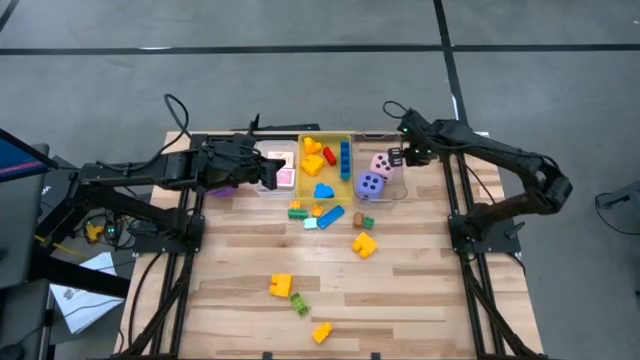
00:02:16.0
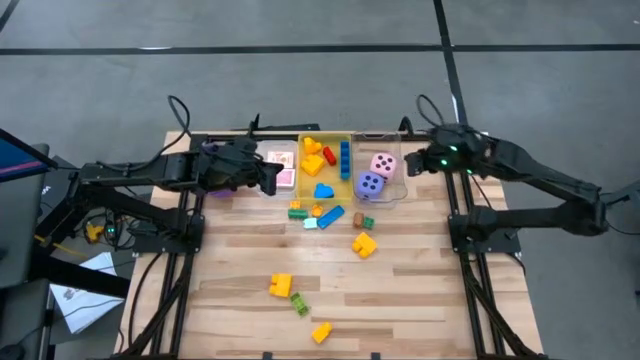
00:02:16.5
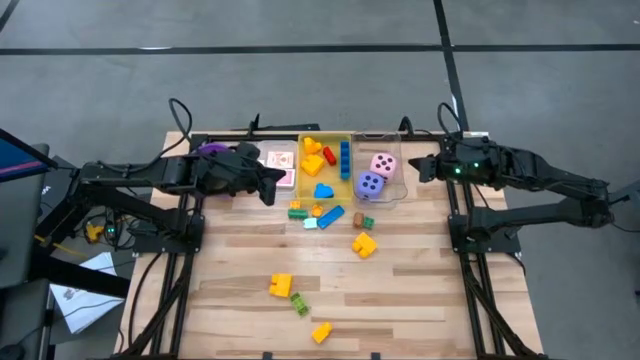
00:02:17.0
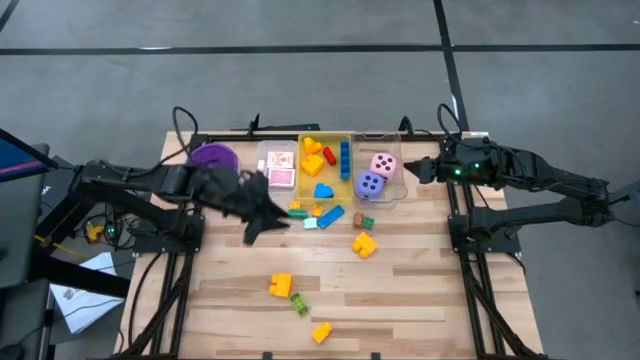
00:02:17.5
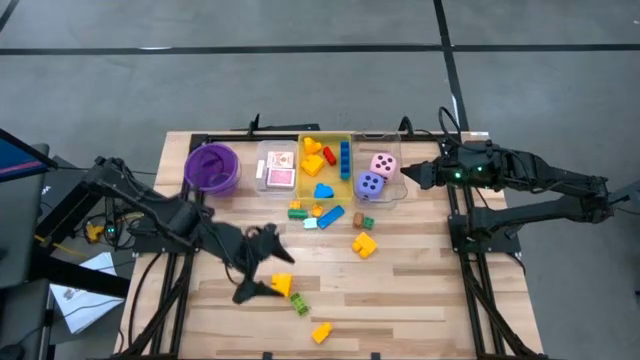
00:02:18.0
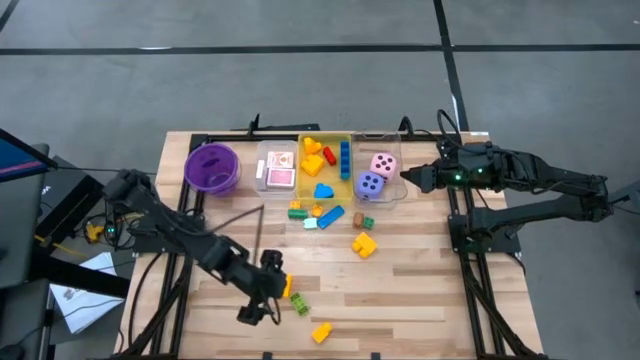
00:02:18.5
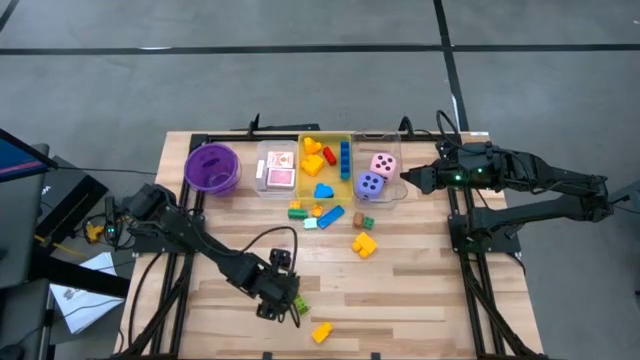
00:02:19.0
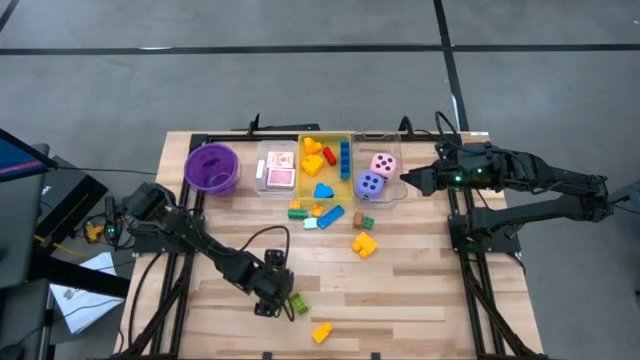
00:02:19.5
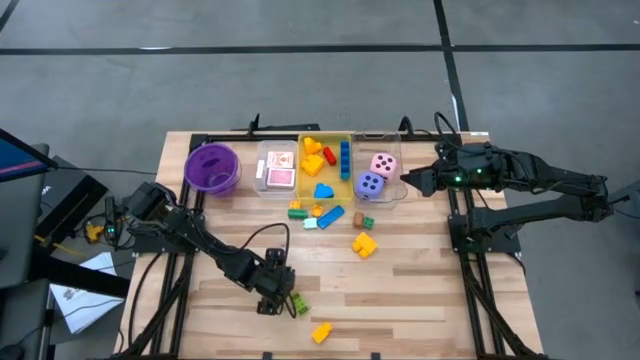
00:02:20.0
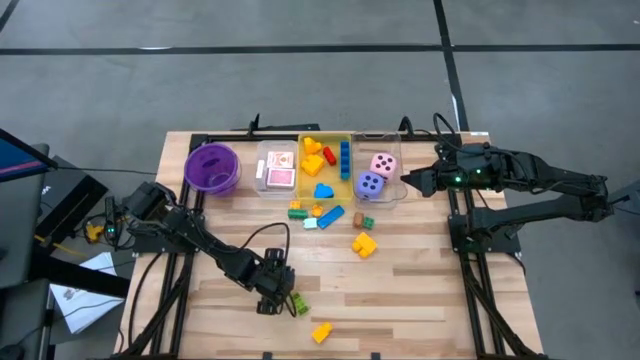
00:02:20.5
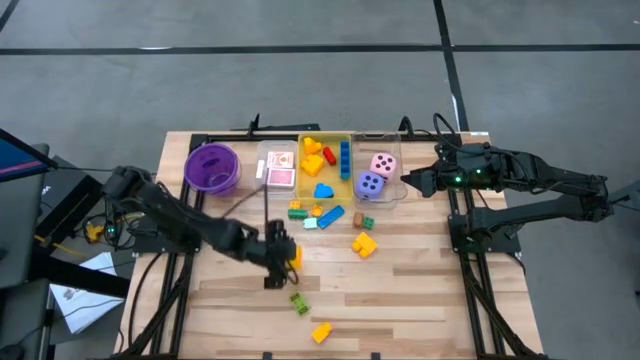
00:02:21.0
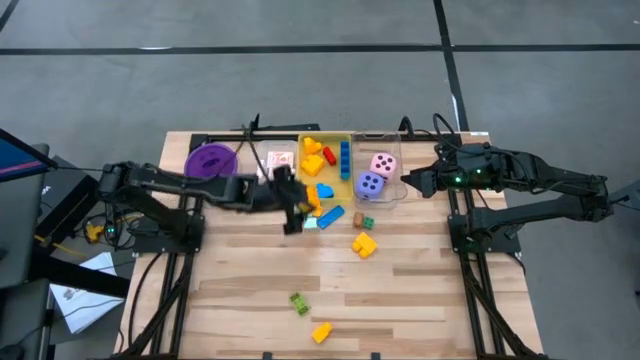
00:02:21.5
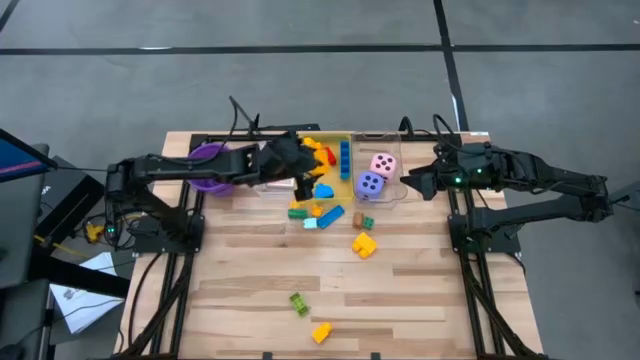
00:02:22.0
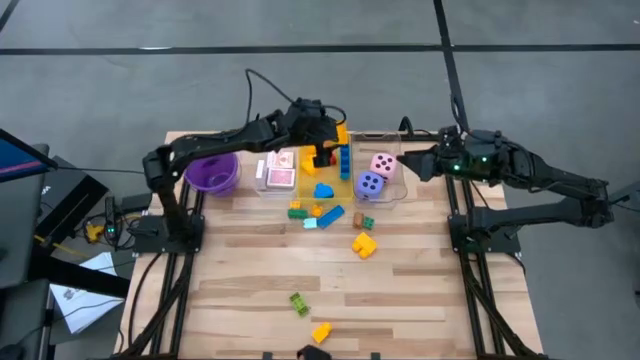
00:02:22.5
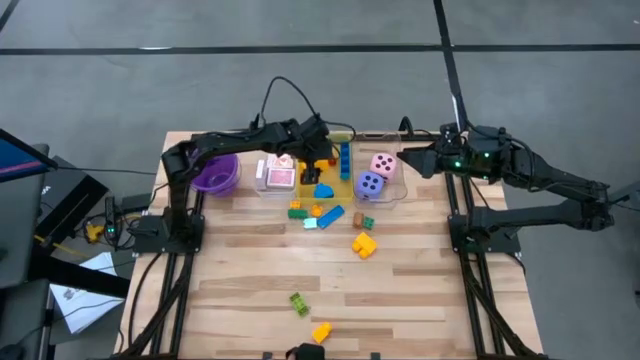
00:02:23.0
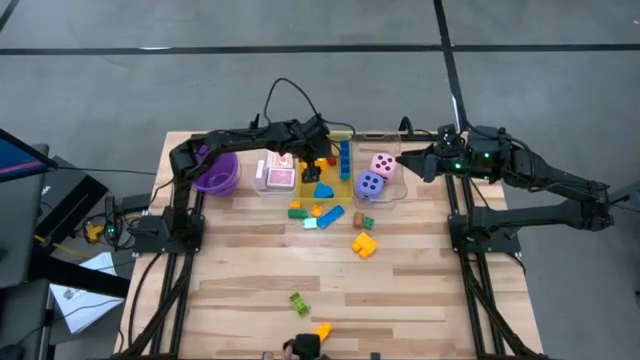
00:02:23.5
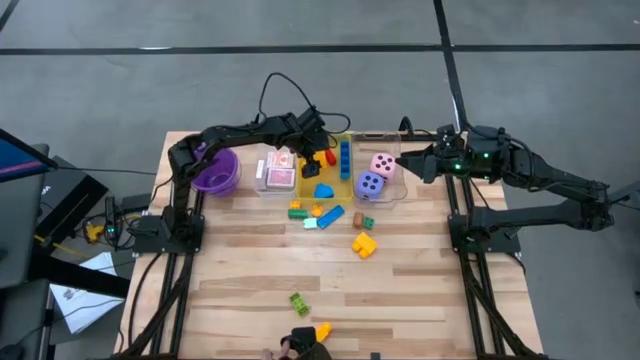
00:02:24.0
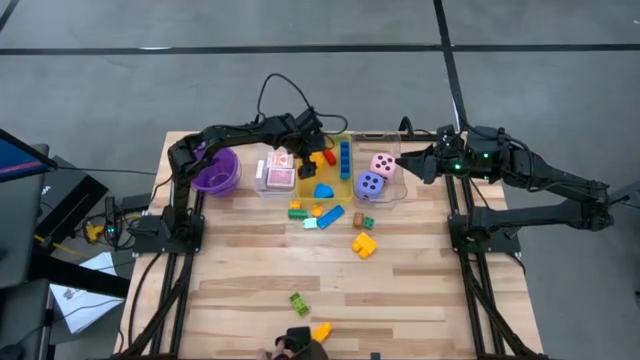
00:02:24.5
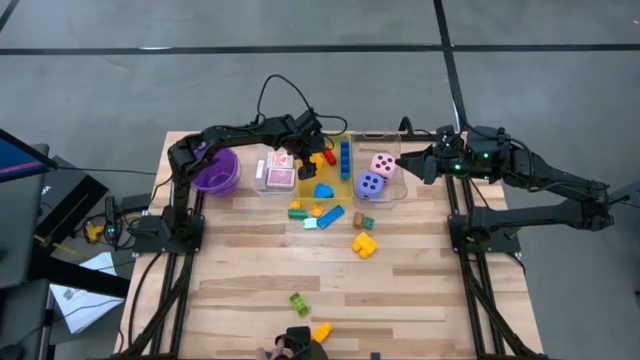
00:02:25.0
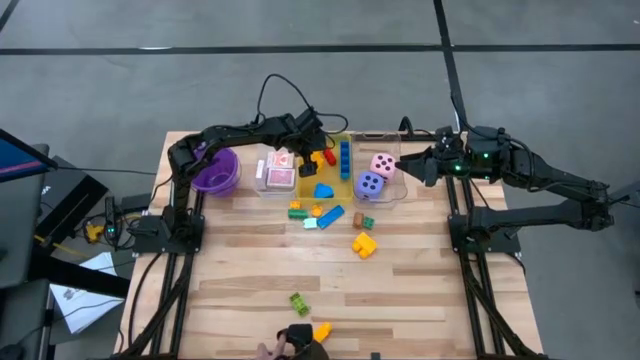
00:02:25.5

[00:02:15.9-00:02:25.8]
Task: Pick & Place Toys
Put the yellow gamepiece into the yellow bin

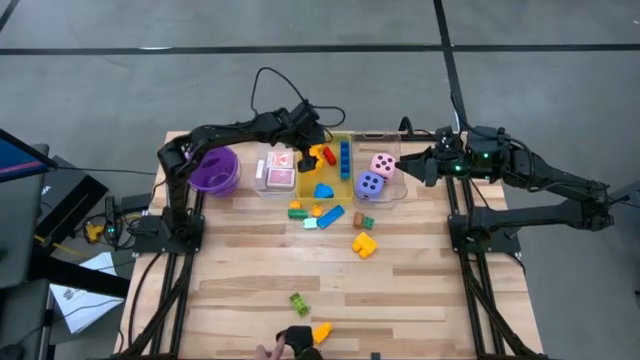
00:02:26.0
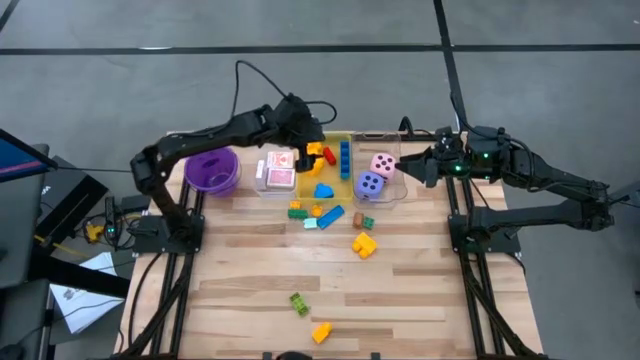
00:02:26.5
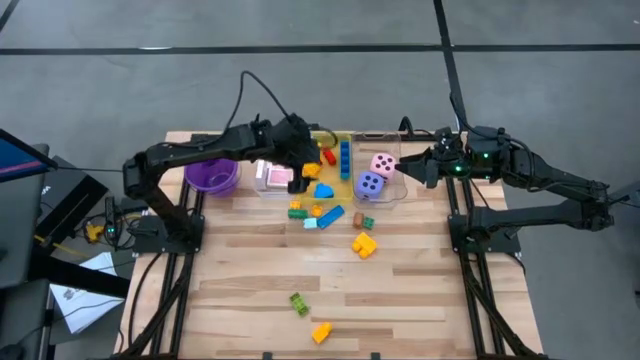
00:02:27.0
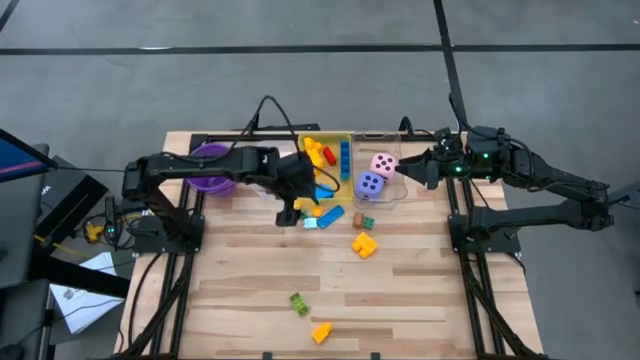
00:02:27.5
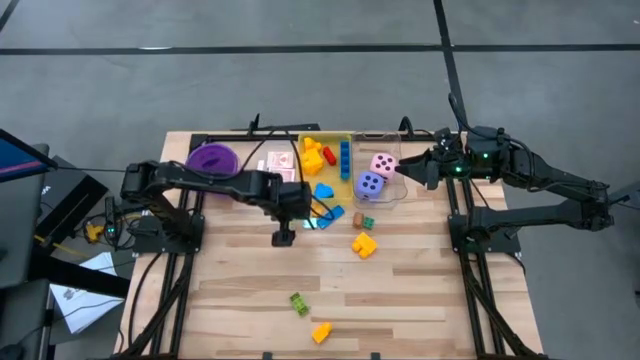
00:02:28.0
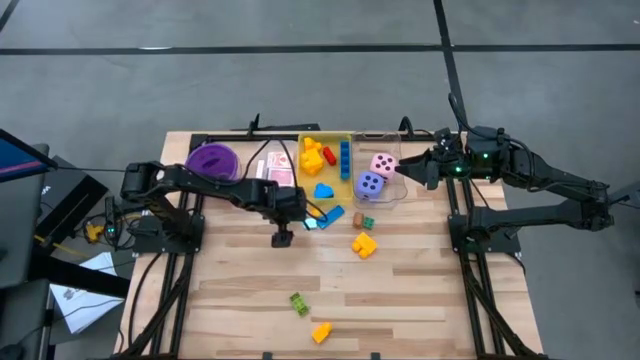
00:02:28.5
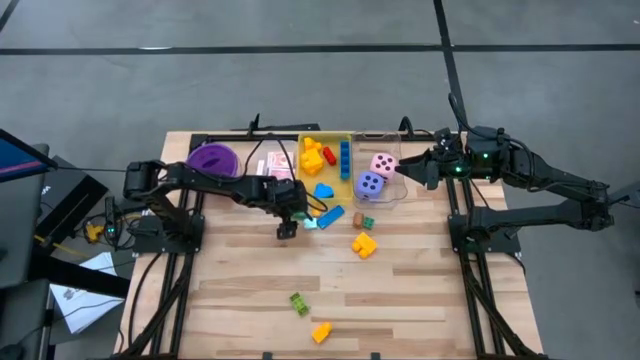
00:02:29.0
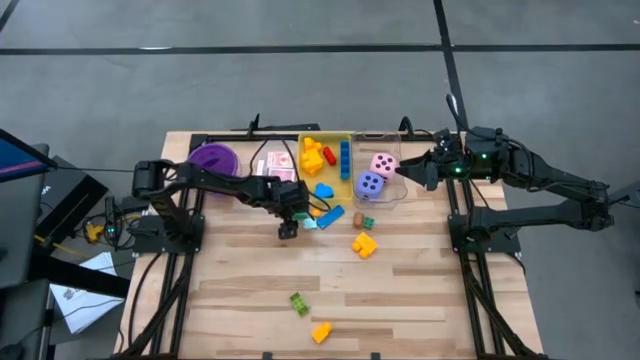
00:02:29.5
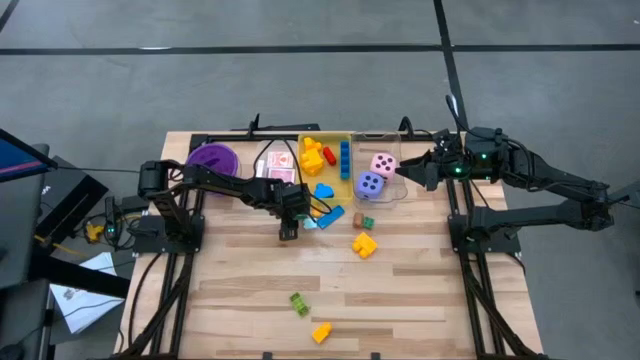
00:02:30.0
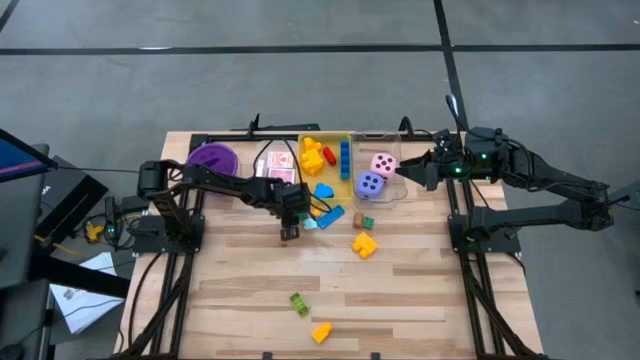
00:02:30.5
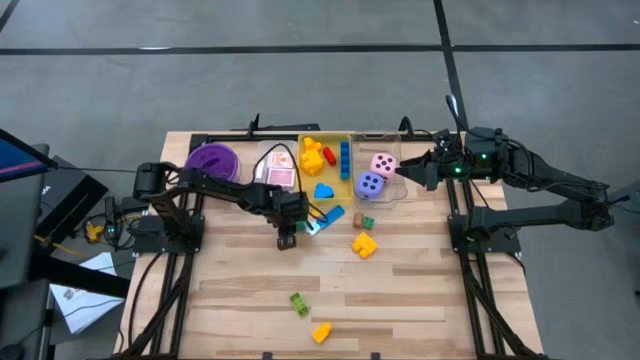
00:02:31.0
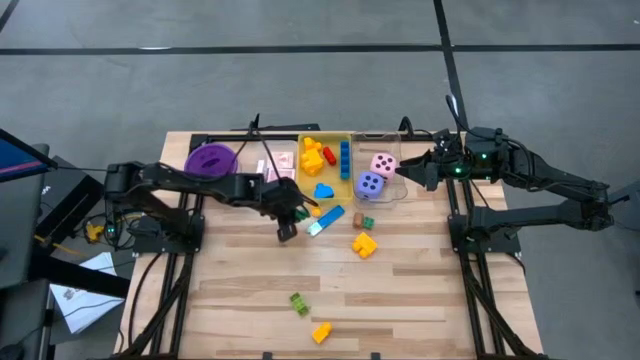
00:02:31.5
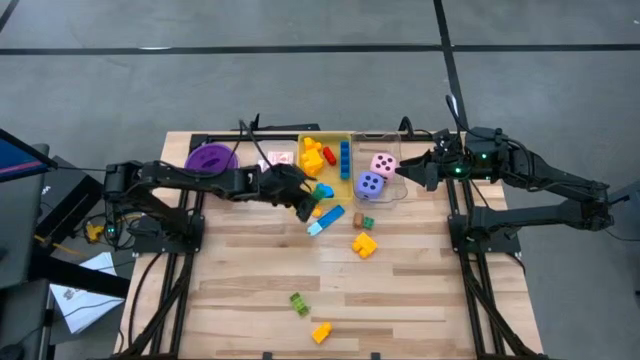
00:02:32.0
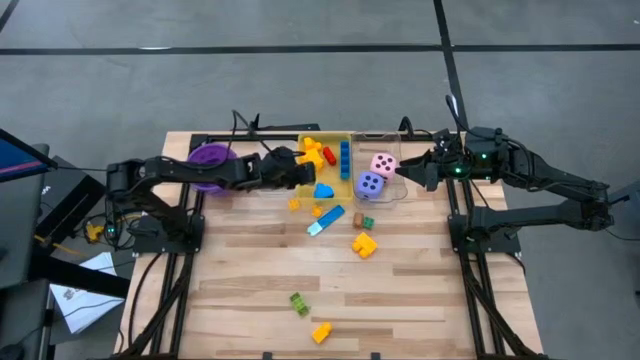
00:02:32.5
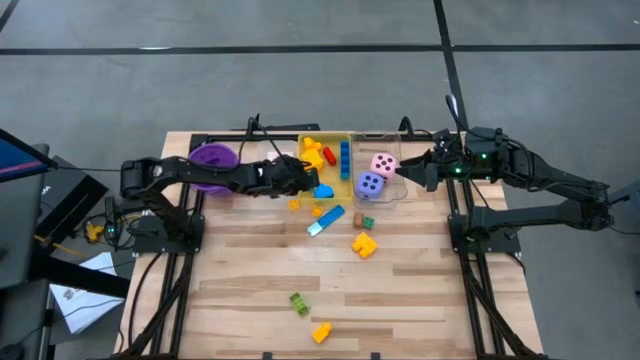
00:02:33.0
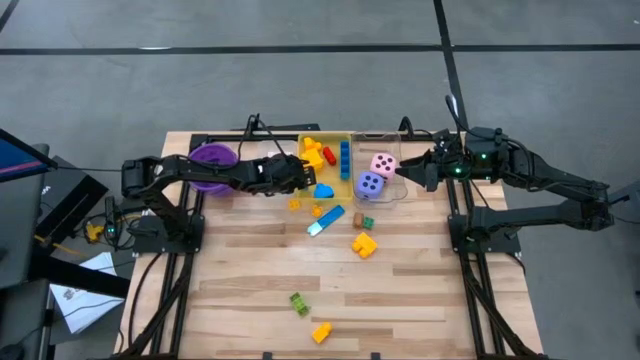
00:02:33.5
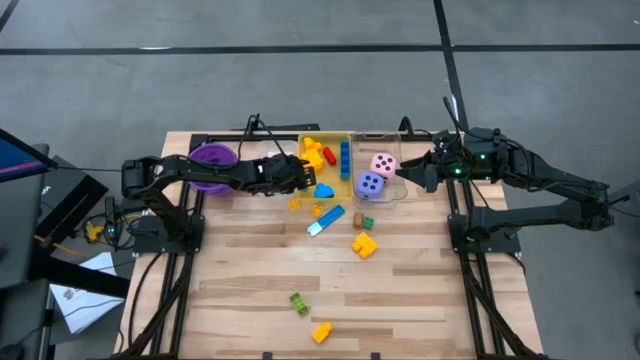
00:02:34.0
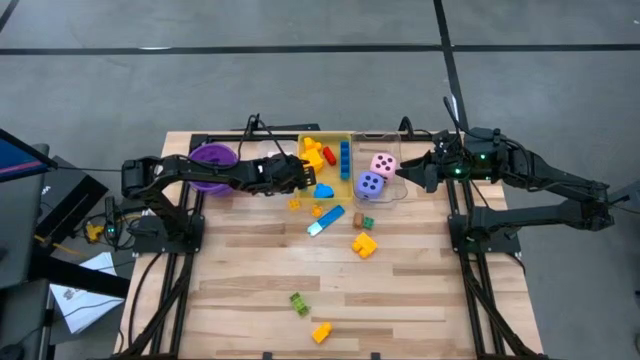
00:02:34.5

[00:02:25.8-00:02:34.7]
Put the green gamepiece into the yellow bin

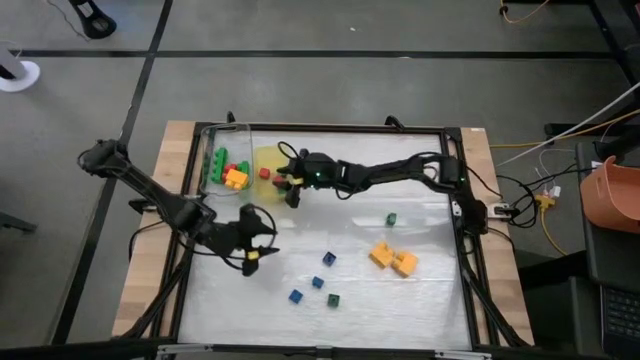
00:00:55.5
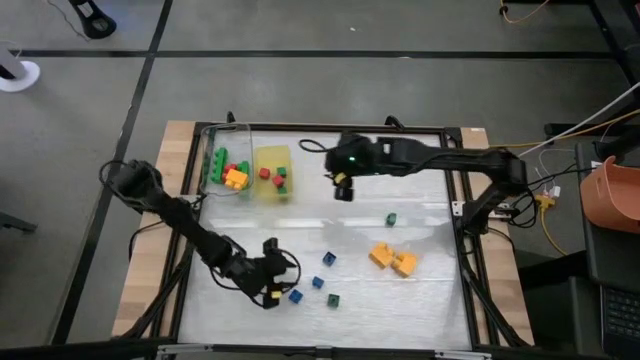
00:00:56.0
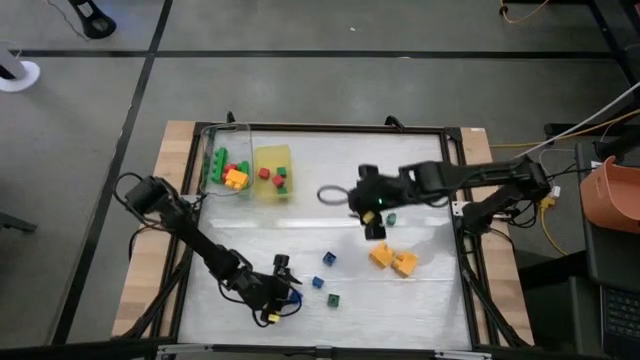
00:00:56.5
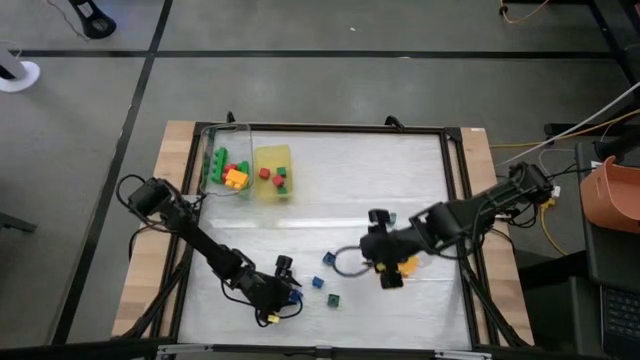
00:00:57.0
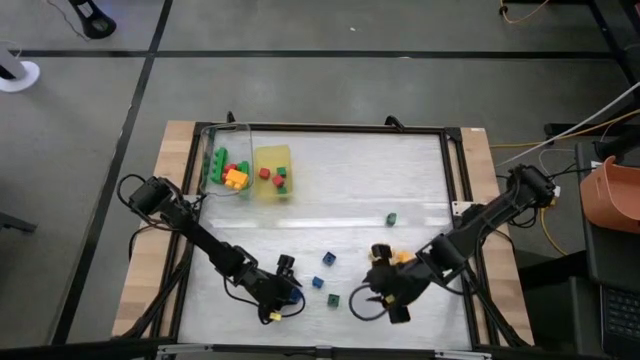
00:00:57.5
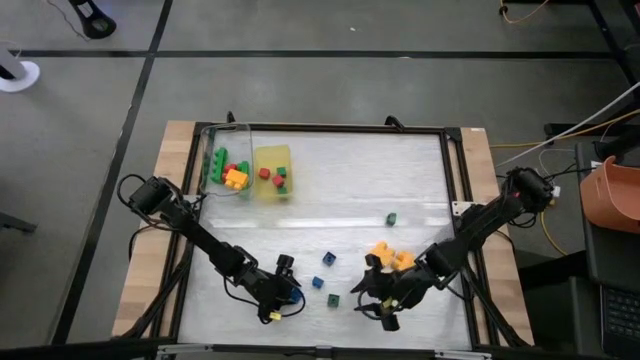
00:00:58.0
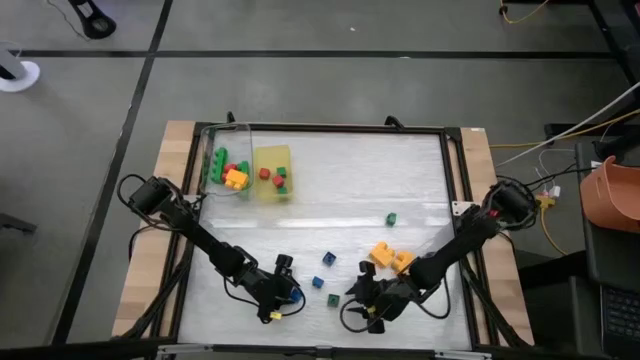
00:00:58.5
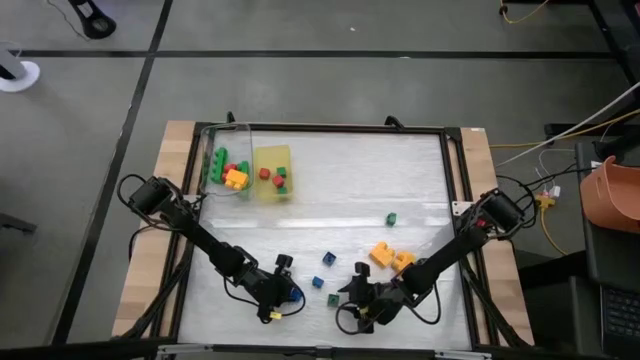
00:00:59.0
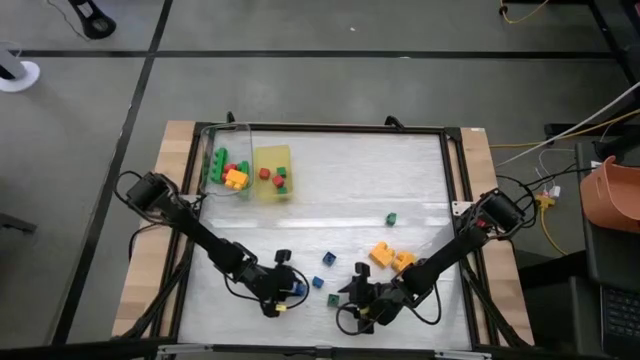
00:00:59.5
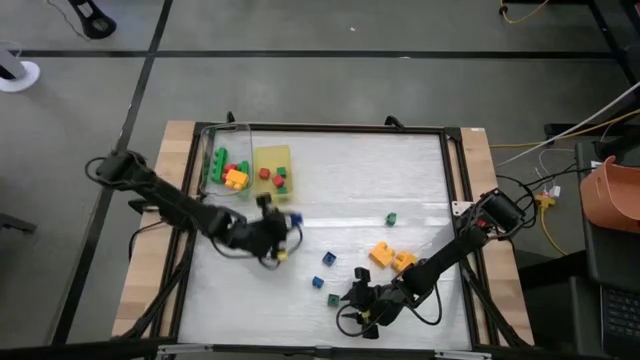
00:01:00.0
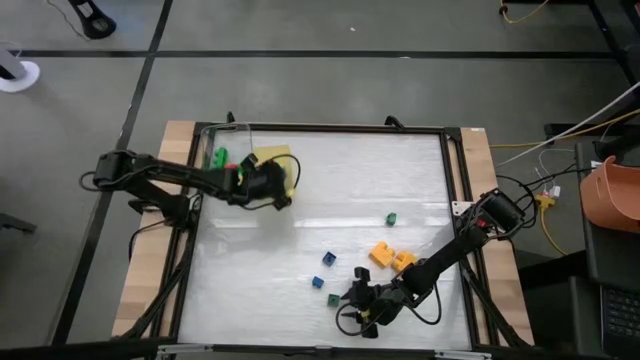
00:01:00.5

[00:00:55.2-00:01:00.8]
Task: Sort blocks by size
Put the small blue game piece into the yellow bin
